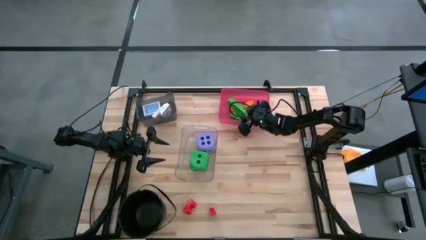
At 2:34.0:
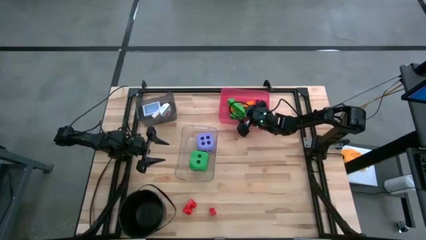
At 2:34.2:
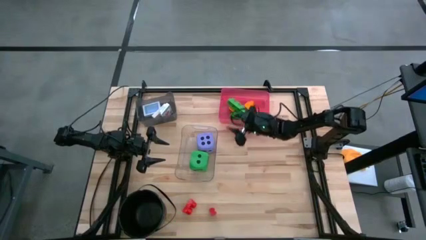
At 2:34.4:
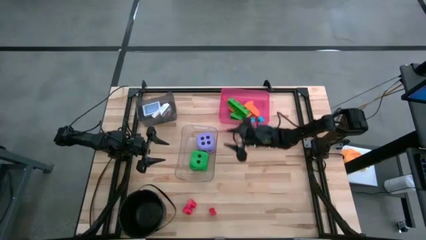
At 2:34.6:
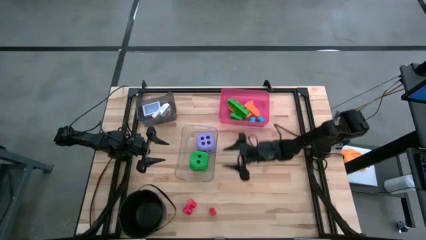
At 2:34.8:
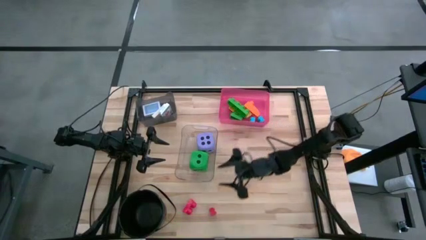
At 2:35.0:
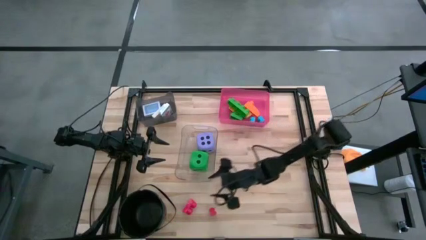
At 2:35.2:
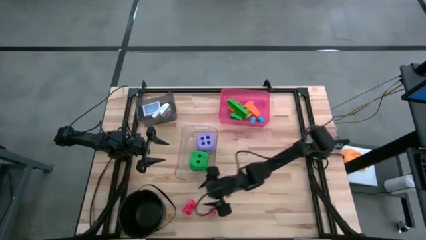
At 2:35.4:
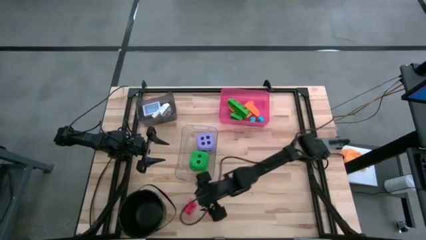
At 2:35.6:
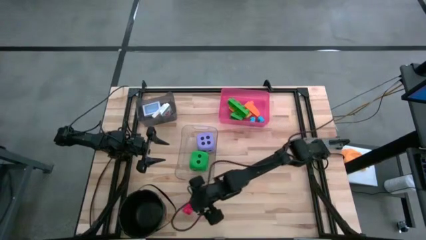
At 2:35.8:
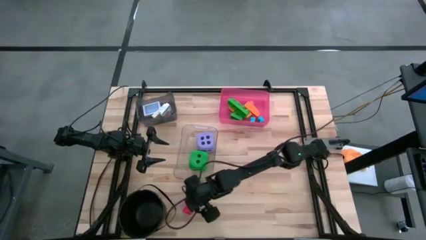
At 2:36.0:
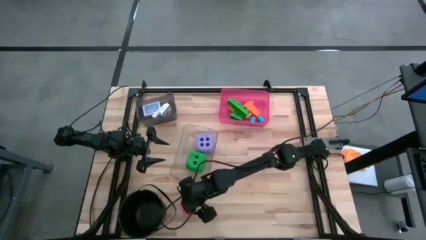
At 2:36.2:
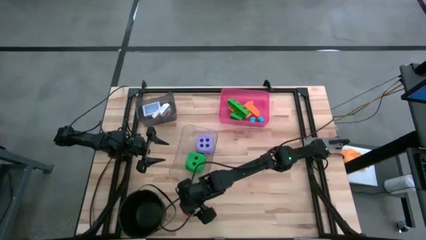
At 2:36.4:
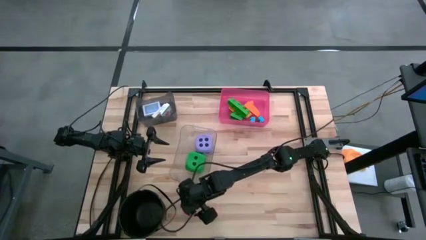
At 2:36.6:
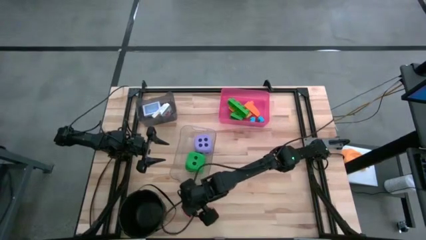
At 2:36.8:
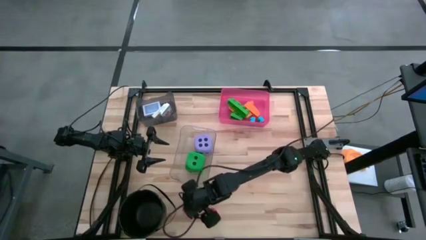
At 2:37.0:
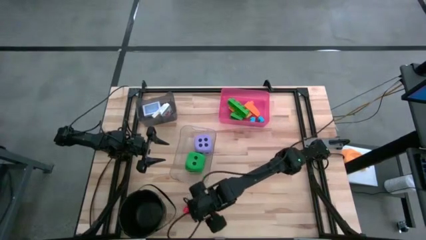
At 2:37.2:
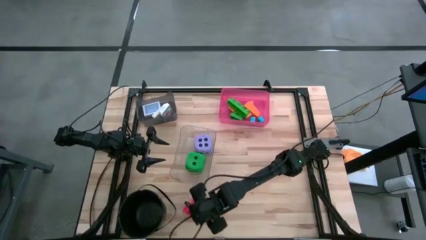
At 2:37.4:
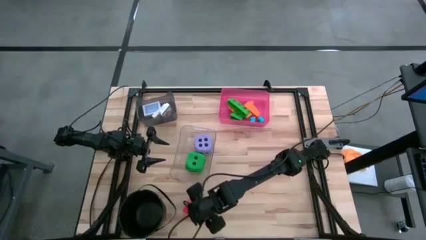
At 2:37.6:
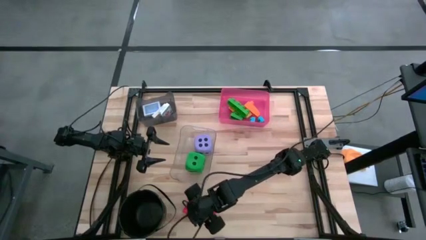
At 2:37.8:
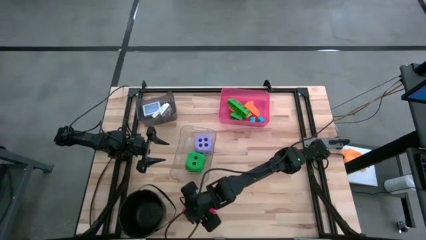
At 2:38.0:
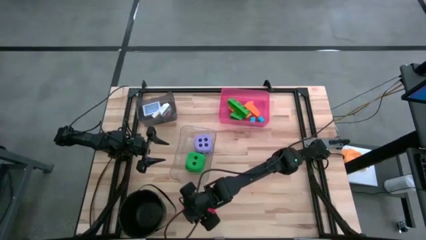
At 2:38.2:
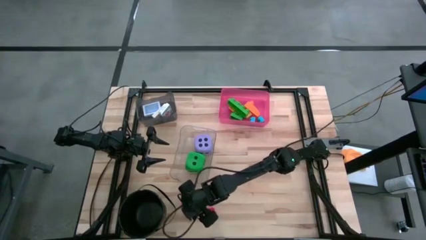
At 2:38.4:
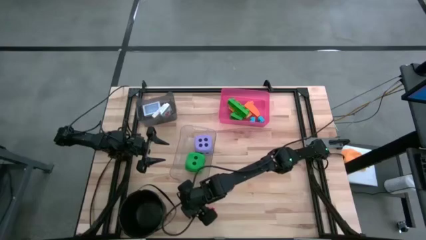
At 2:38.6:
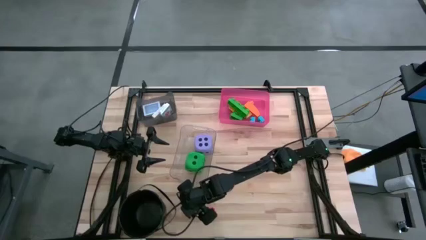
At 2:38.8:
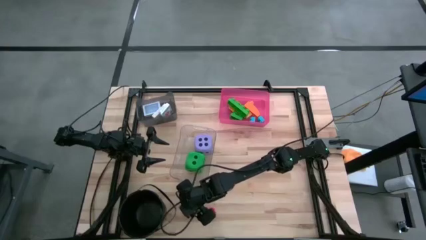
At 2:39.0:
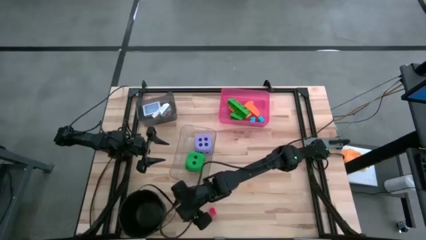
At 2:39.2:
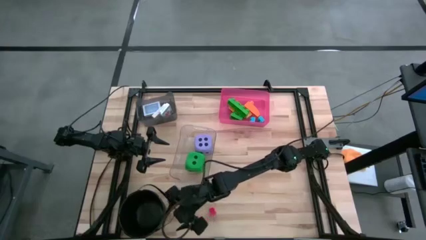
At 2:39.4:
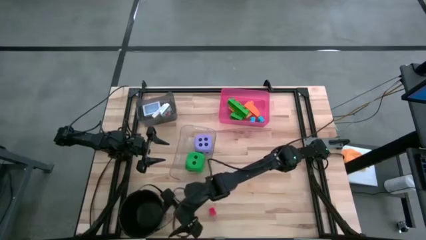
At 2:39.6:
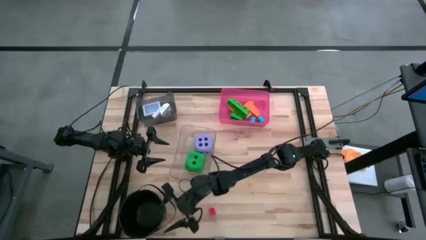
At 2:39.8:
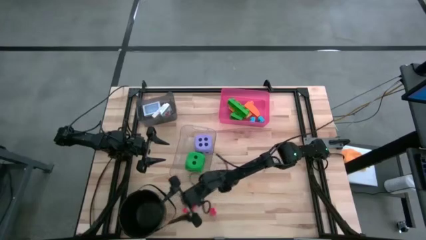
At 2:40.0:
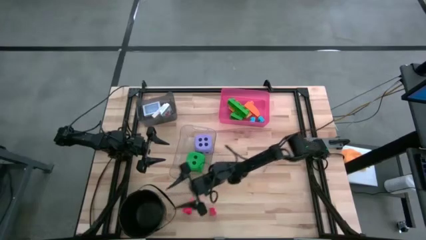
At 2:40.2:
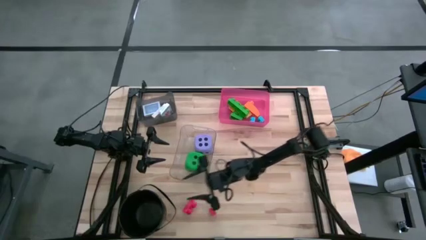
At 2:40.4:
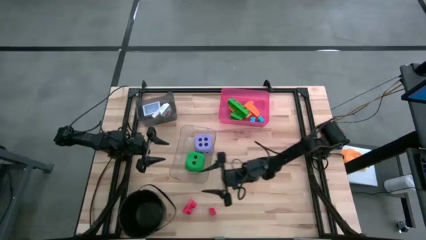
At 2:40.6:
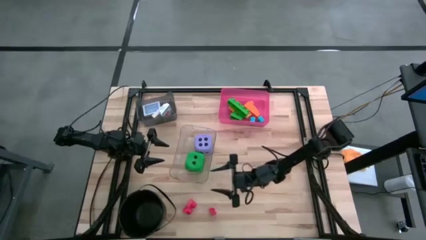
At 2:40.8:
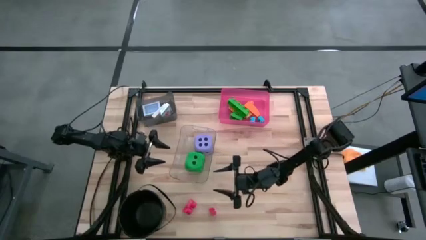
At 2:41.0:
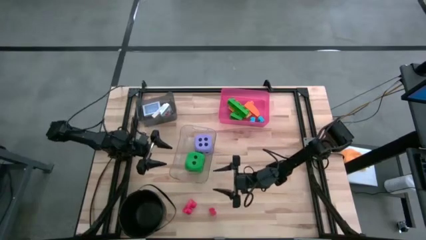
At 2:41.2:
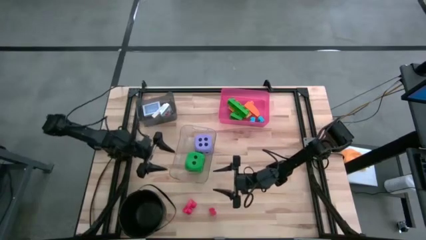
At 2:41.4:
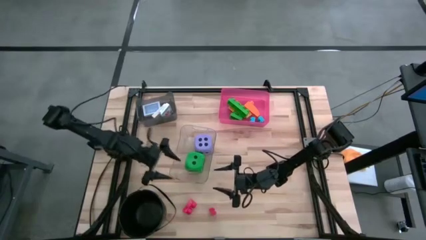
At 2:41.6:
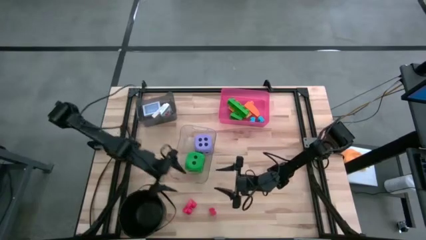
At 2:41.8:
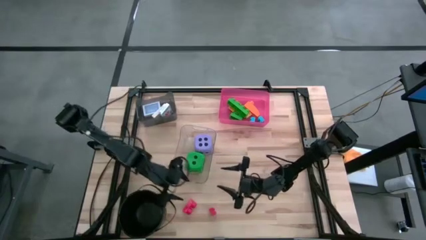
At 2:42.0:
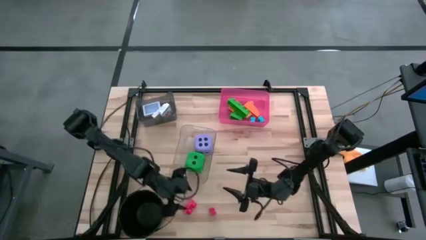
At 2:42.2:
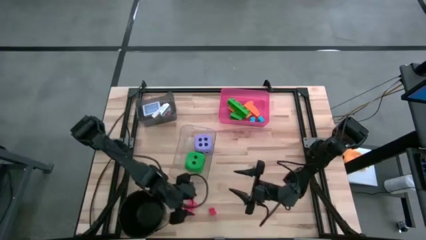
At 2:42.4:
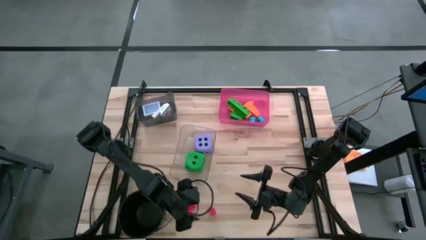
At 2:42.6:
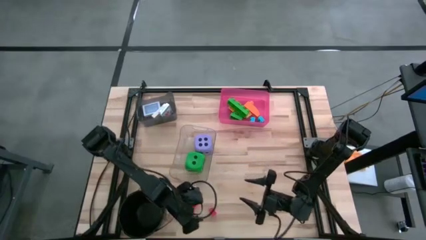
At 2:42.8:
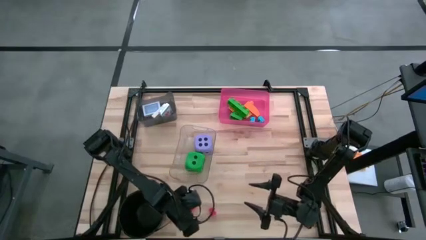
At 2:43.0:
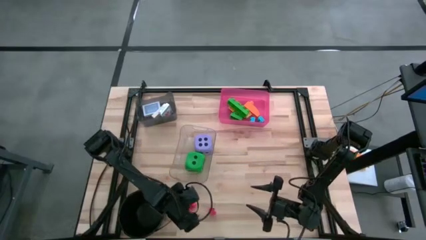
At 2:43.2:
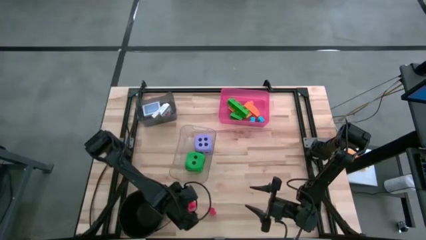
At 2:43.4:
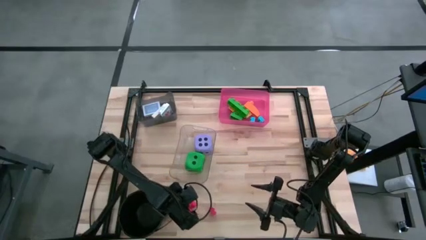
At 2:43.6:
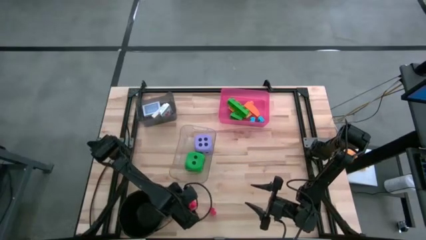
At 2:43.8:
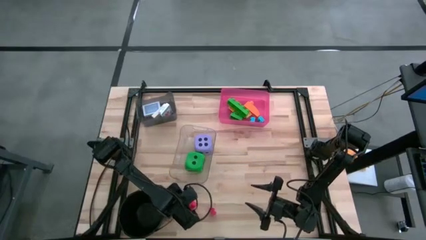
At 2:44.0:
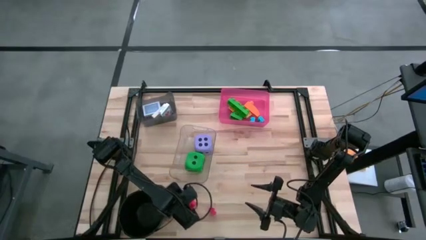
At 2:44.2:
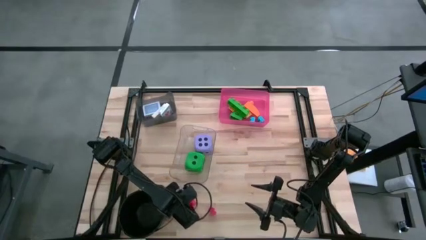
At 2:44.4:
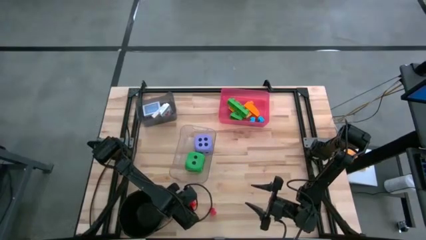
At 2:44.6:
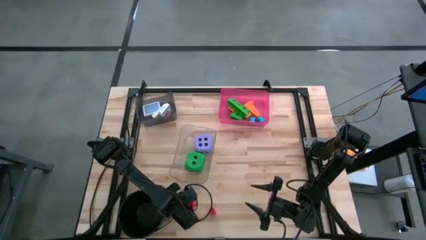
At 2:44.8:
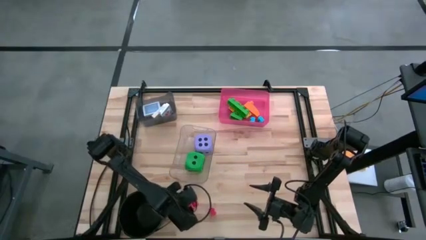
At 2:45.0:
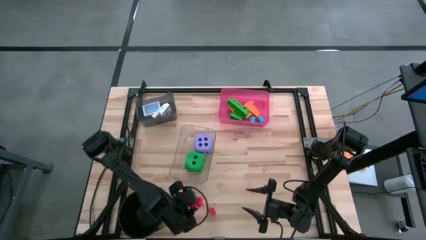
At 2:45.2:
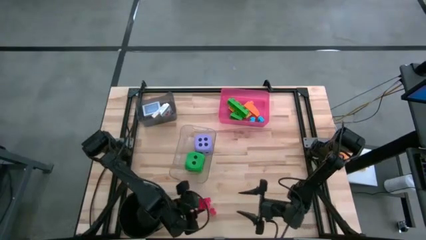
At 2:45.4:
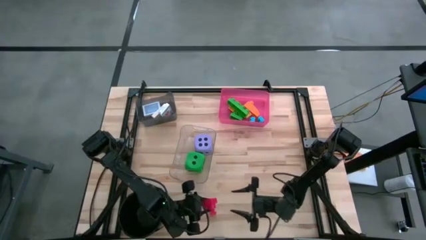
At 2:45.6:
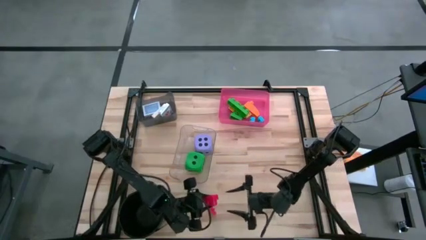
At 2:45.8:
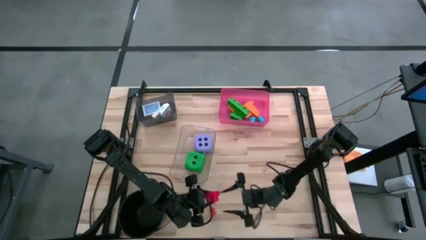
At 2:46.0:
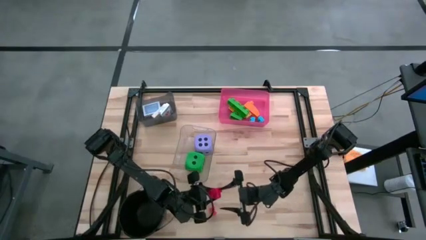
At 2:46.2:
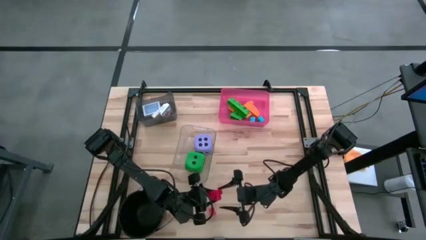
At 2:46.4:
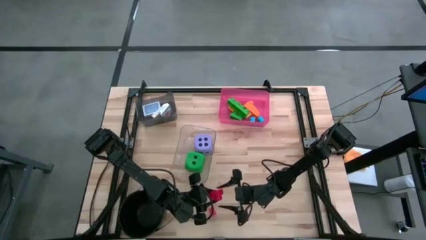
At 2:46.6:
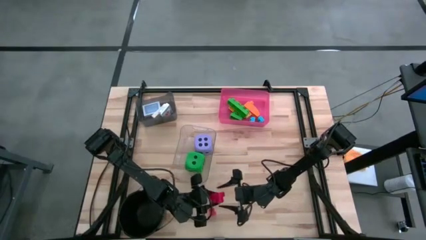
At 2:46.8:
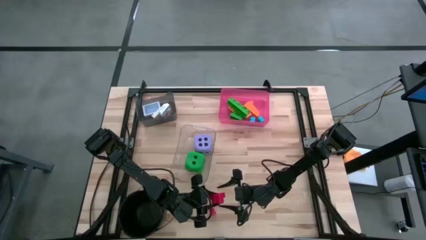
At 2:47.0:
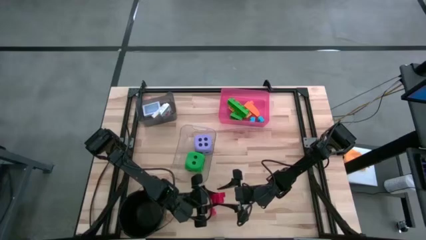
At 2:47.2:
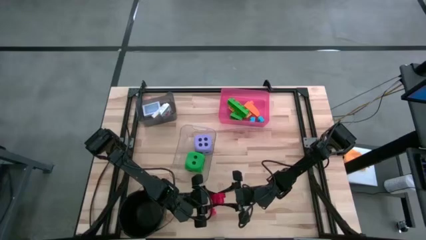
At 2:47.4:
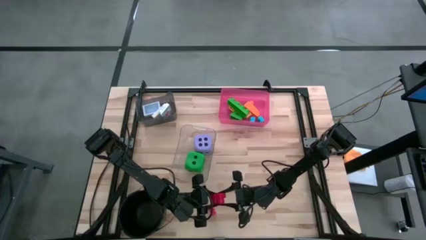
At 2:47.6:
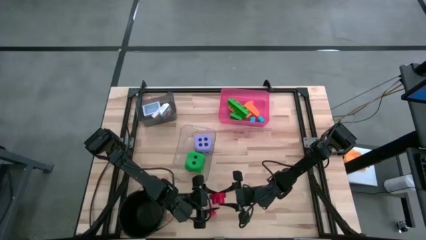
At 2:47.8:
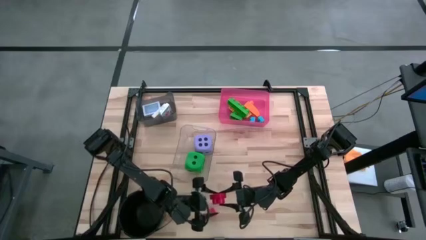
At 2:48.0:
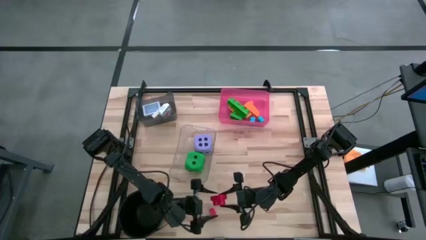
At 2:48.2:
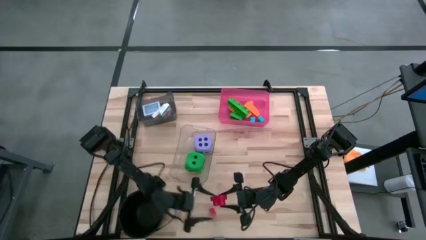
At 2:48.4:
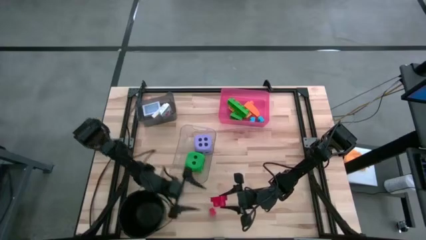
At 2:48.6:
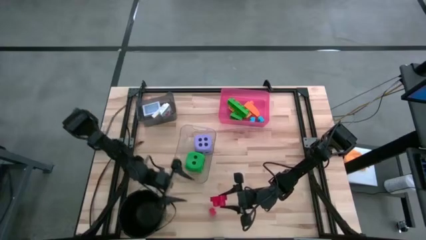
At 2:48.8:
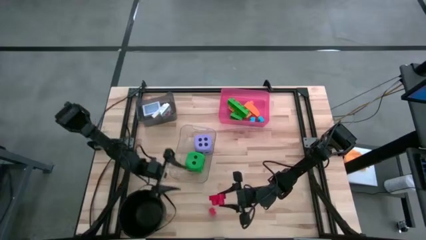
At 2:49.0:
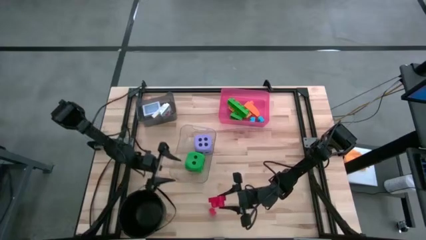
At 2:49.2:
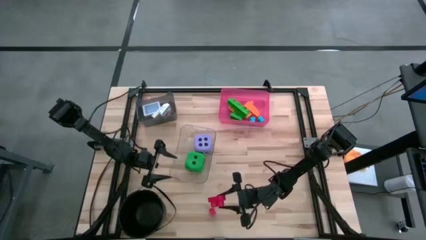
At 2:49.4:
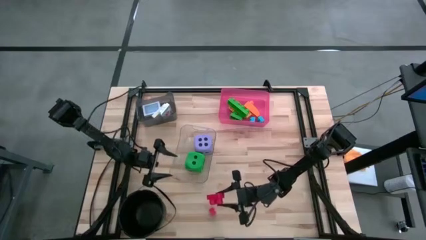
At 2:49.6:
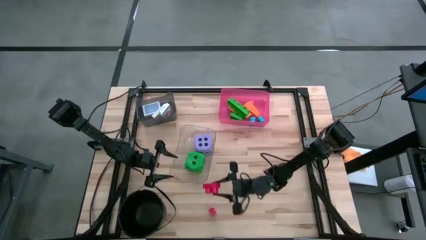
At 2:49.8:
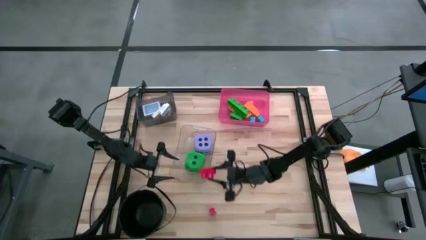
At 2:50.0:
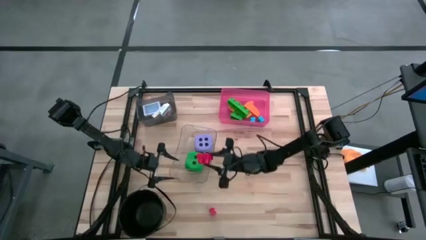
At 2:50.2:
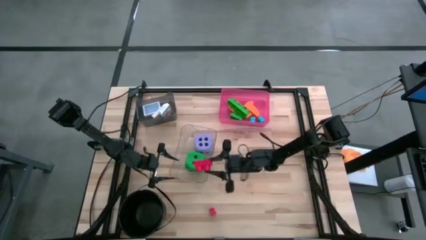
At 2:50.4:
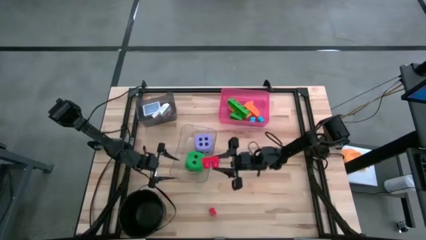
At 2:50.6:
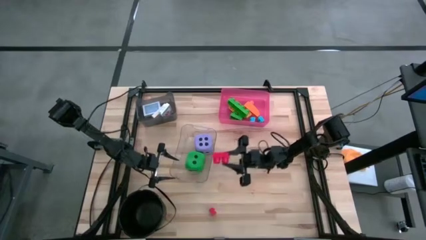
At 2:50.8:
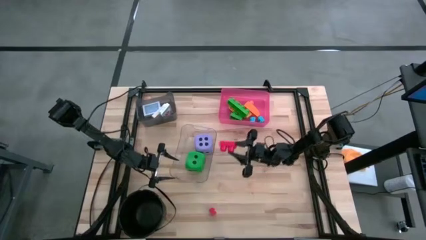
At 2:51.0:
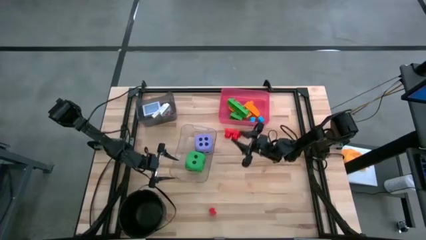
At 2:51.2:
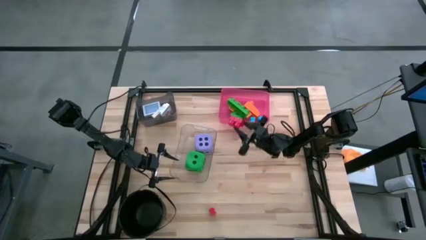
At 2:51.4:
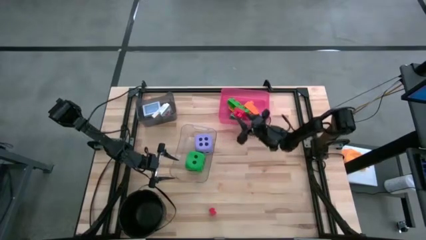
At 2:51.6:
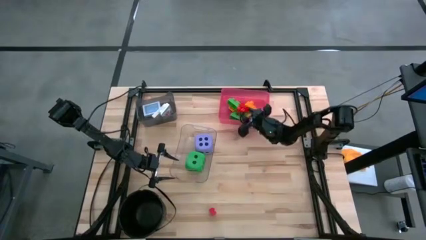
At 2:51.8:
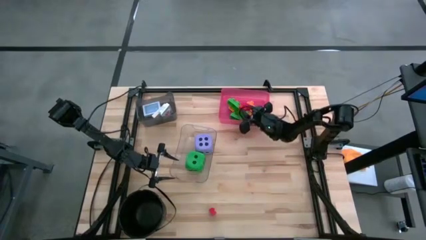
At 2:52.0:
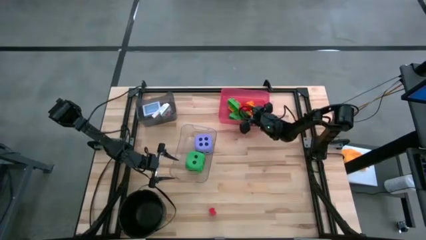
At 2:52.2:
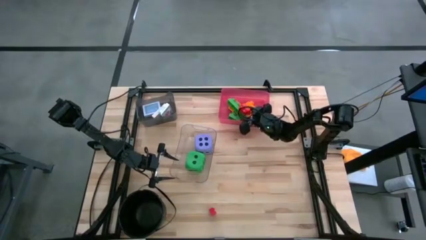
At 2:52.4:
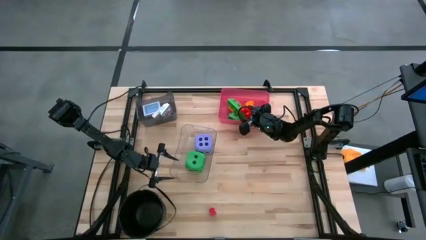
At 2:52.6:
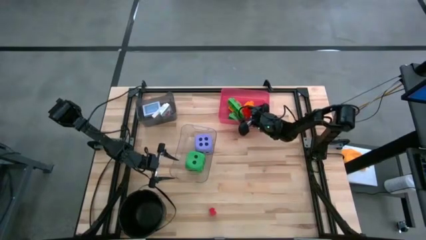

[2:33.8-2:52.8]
Task: Pick & Place Toys
Put the left red game piece into the pink bin
